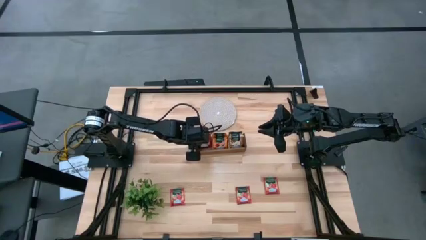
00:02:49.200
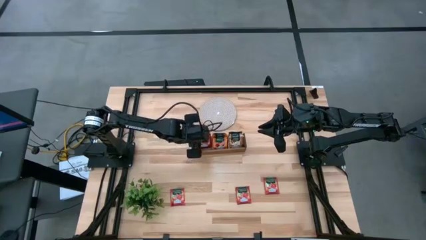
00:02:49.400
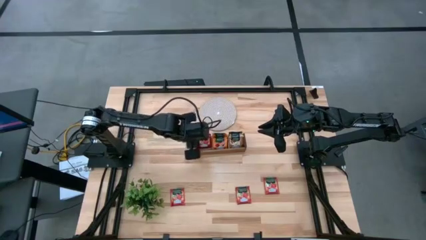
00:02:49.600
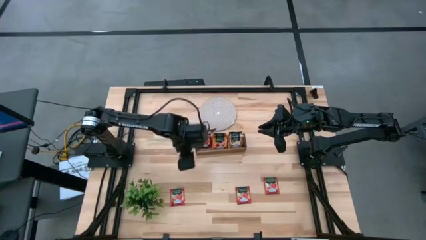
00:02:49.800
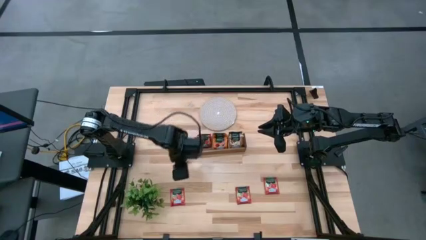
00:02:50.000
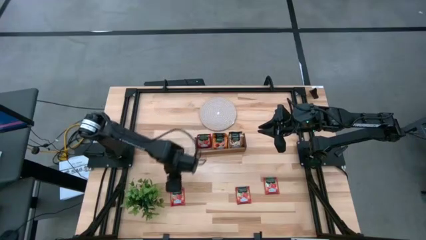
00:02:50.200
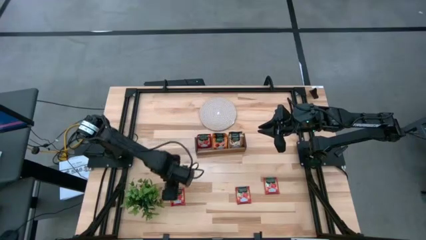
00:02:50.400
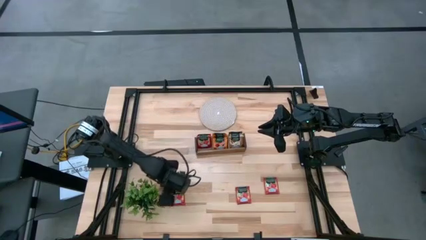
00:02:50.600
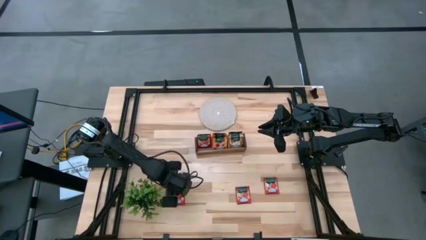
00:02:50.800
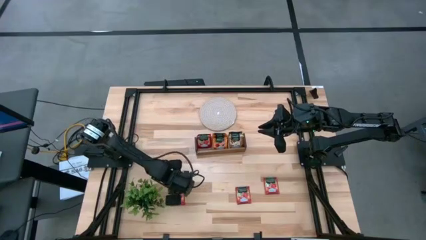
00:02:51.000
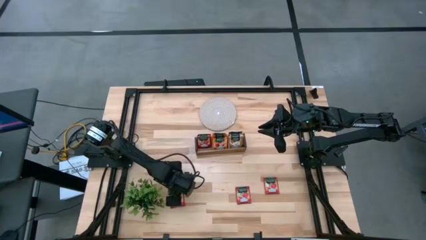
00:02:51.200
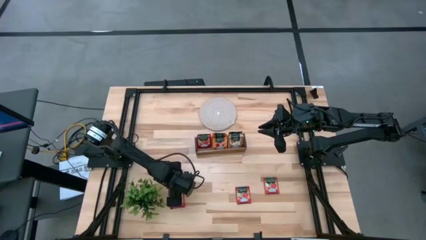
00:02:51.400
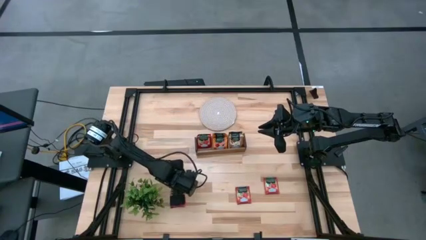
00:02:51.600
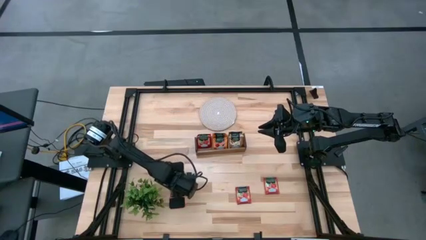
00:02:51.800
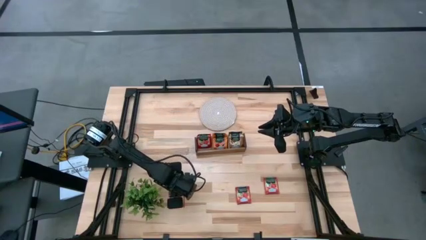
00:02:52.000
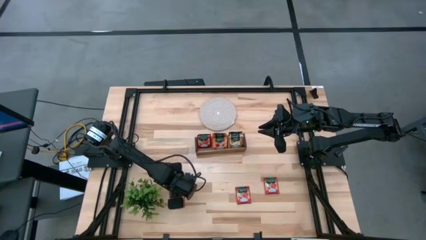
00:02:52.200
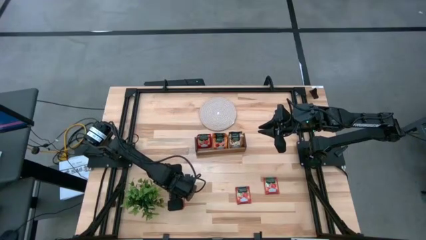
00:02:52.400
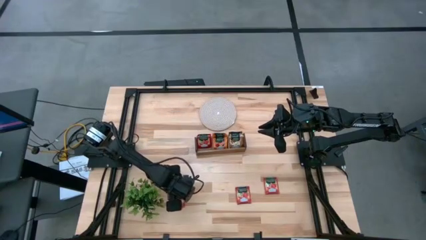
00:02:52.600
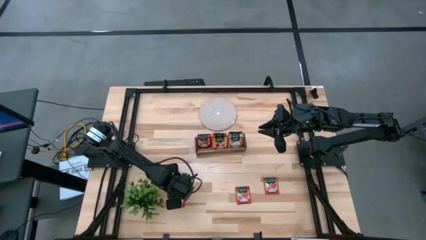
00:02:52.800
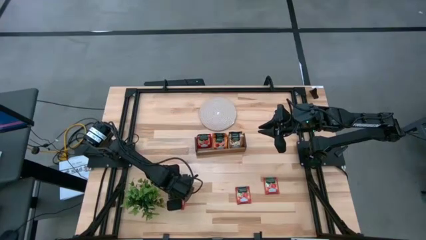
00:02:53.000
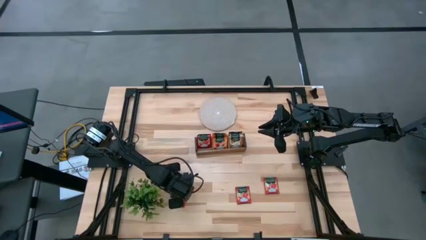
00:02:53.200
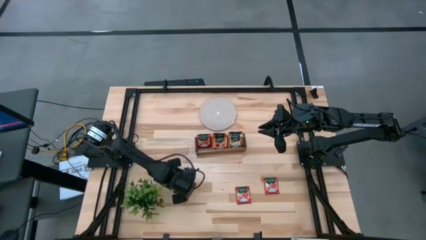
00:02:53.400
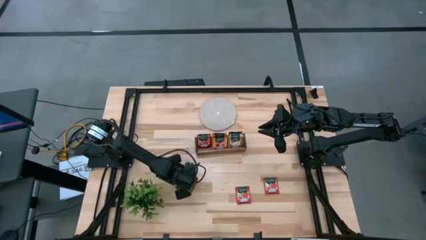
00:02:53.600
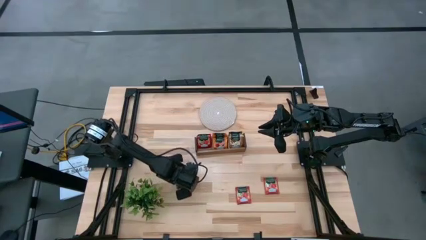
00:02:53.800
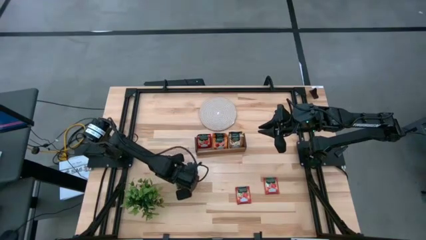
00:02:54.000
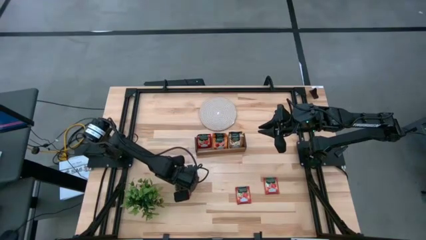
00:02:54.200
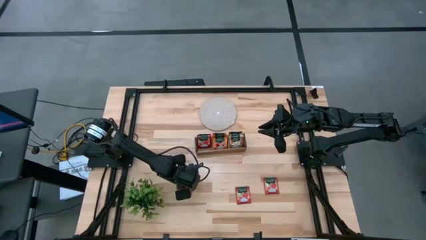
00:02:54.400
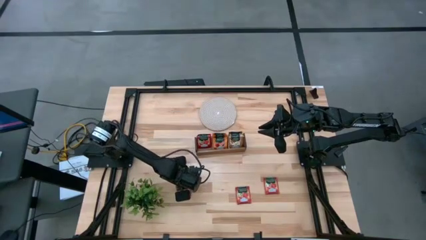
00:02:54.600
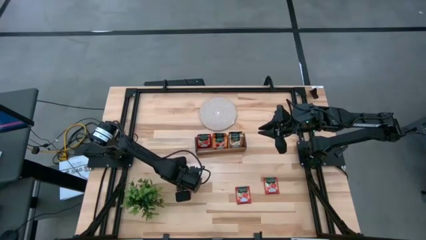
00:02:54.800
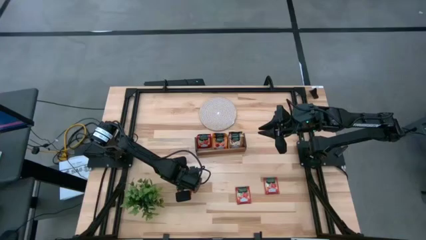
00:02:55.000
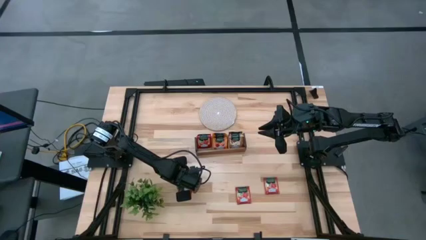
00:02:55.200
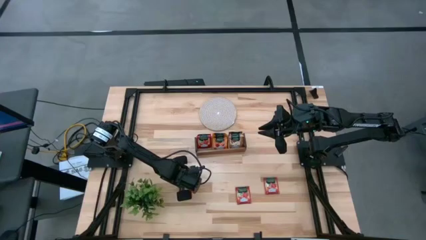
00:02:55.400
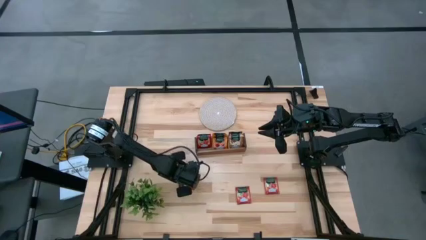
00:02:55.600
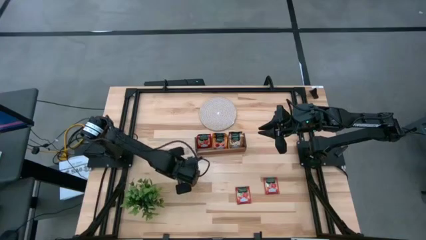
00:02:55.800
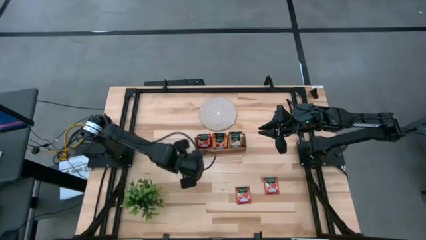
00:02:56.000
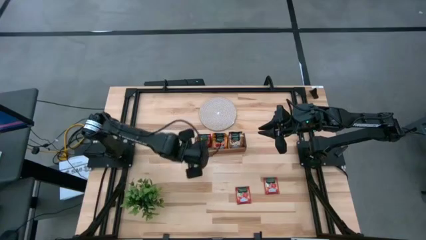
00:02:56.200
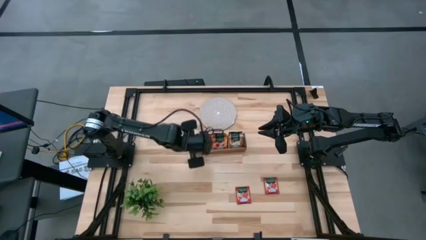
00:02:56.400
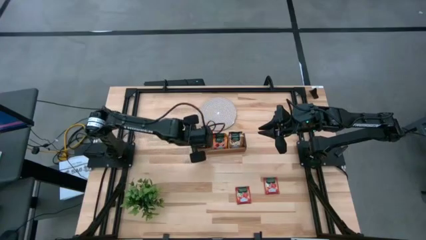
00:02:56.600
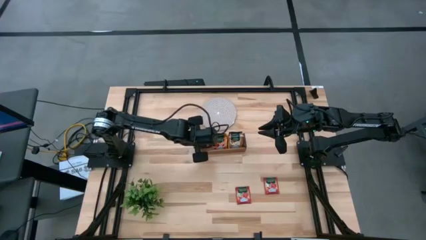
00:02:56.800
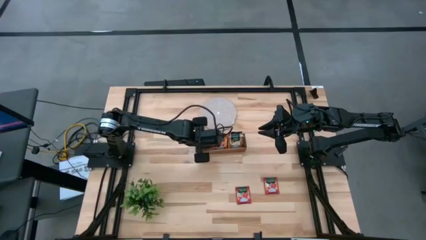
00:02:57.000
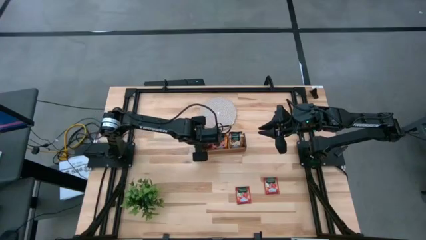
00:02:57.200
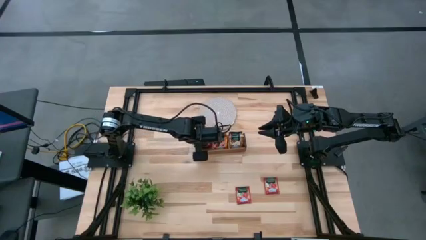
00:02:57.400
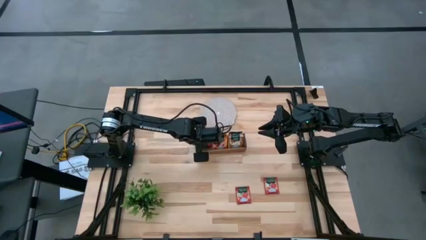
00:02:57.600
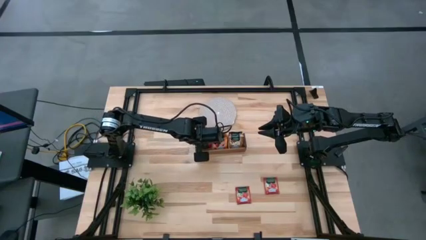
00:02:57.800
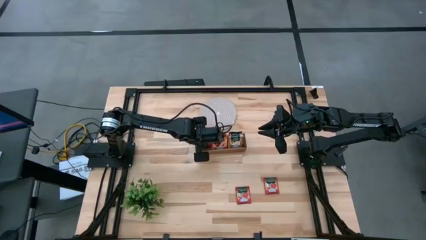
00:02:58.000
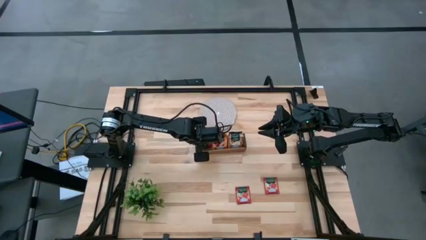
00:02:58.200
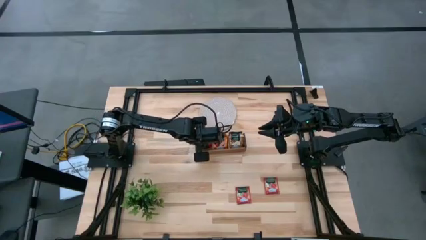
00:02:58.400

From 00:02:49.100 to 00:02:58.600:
Task: Pick & Place Tea
Put the red tea bag into the left section of the wooden organizer
